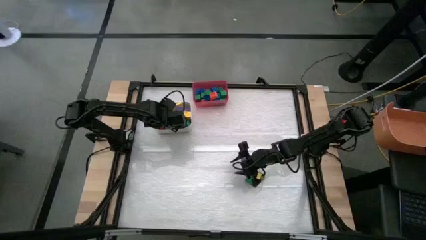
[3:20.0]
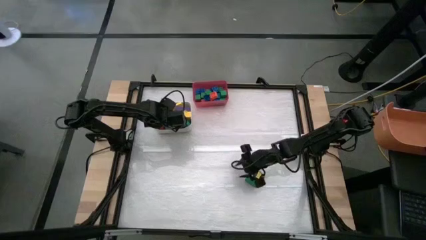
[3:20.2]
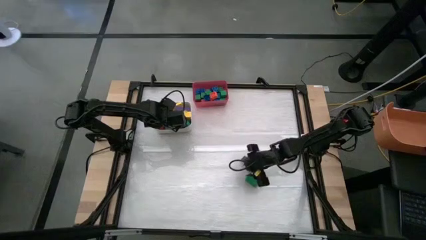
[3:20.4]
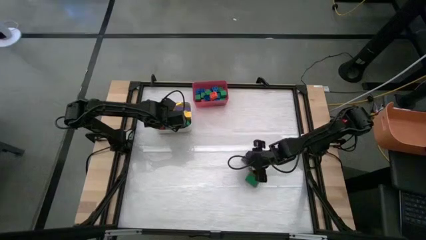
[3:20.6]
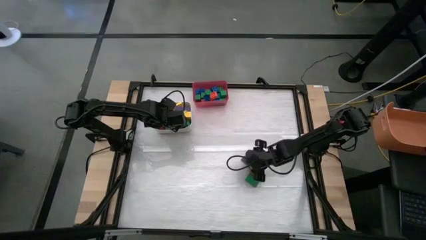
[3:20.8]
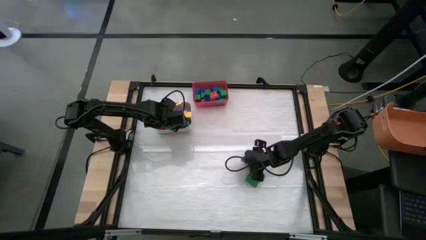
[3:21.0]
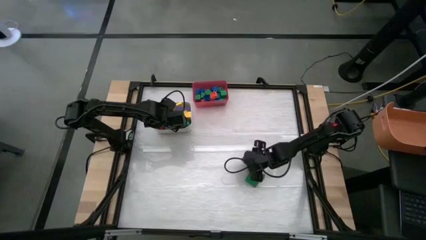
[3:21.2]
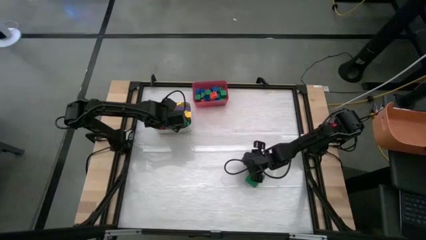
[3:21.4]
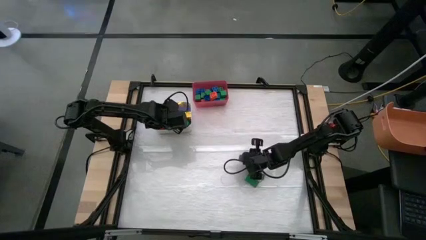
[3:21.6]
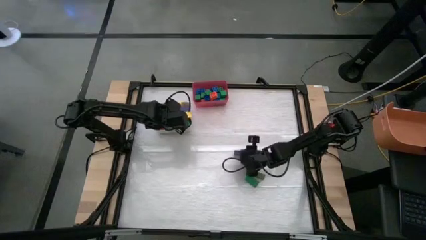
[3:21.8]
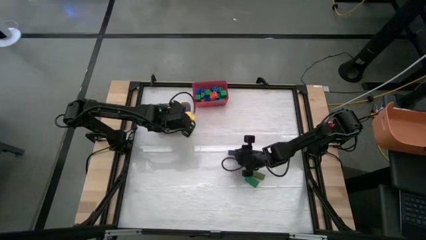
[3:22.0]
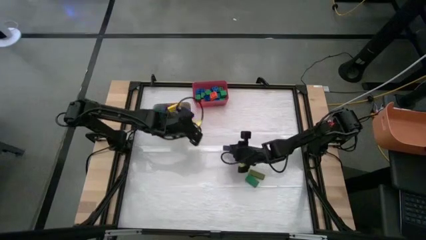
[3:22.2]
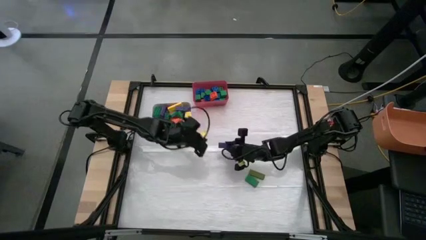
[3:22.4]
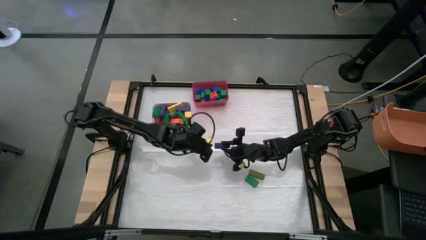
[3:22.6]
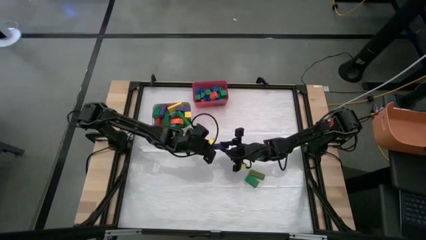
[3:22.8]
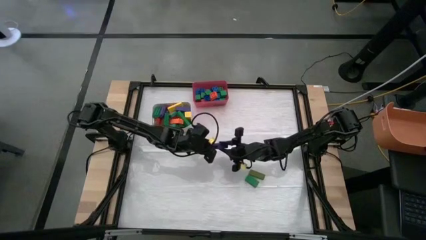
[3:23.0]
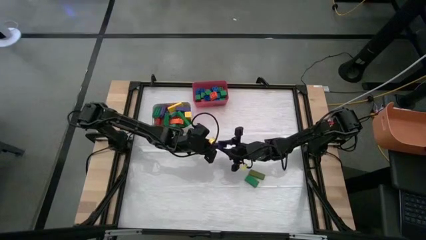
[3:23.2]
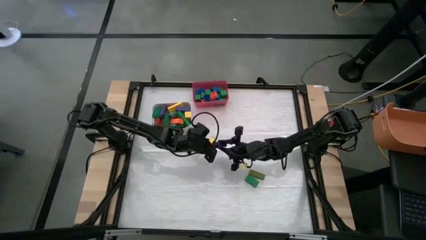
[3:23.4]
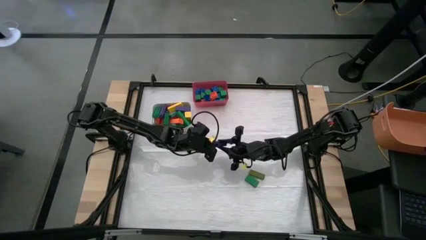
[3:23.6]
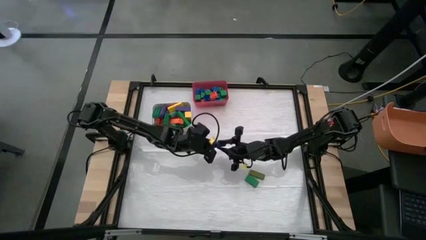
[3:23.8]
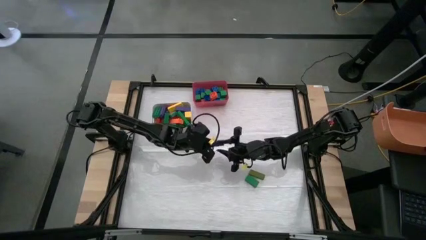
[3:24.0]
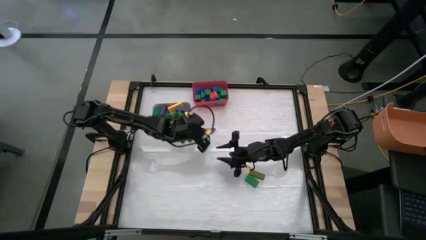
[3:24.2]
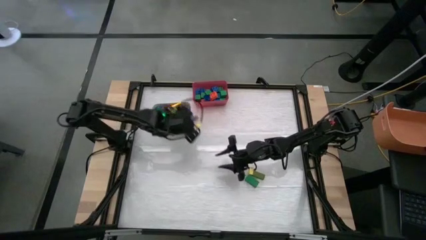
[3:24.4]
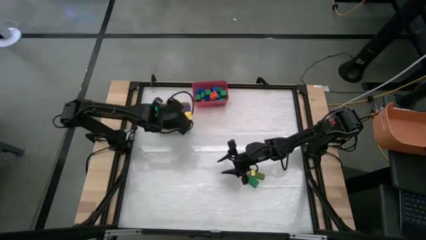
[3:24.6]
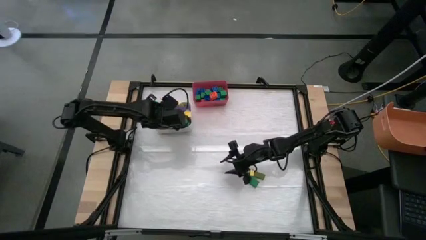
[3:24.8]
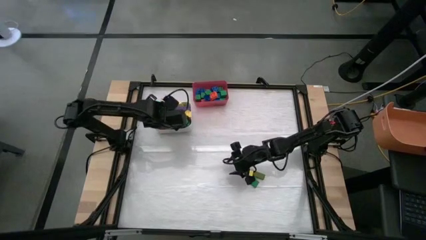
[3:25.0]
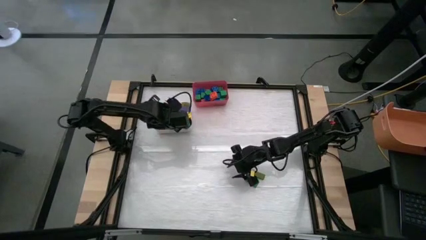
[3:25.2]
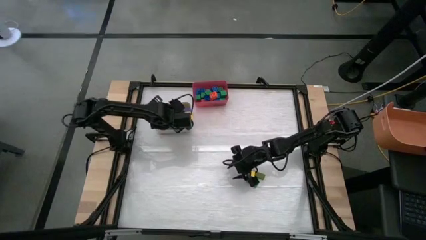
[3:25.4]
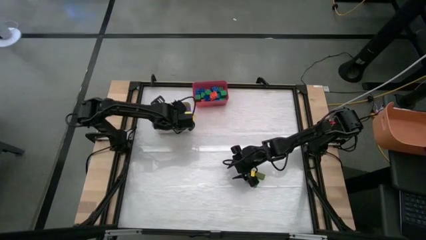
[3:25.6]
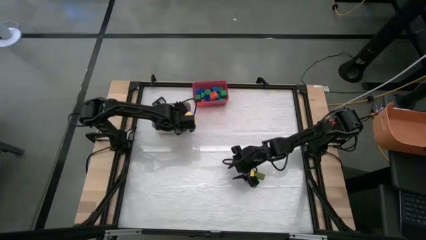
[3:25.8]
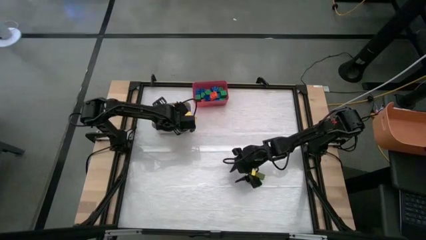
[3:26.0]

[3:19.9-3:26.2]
Task: Sort blocks by size
Put the large violet wooden block into the white bin

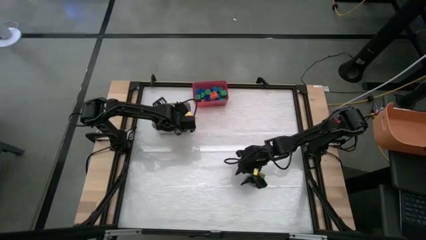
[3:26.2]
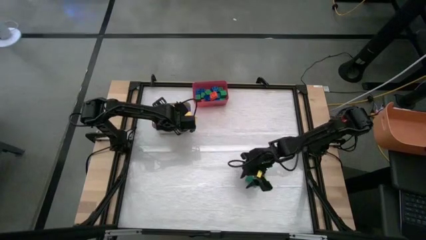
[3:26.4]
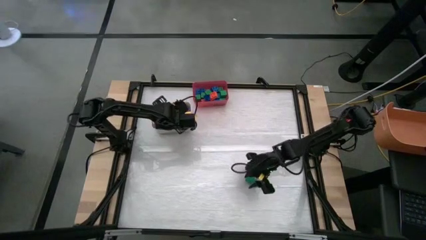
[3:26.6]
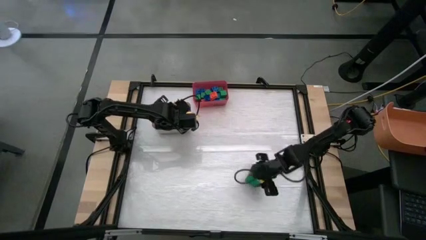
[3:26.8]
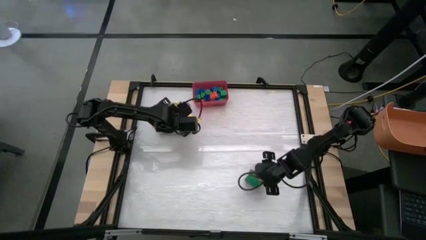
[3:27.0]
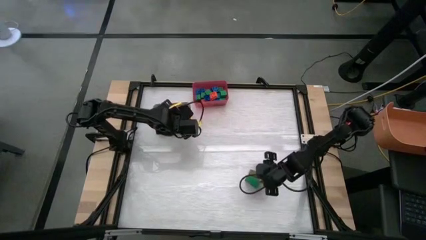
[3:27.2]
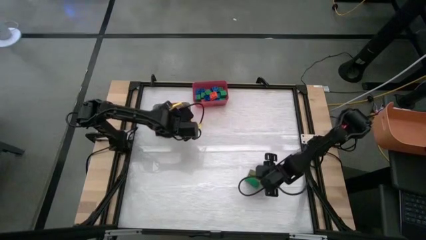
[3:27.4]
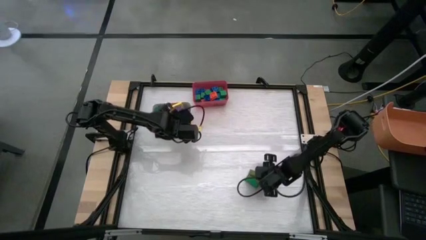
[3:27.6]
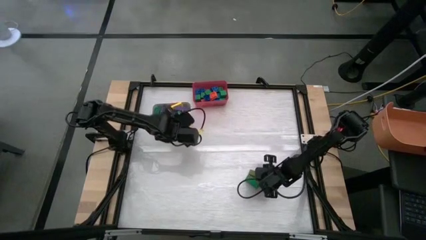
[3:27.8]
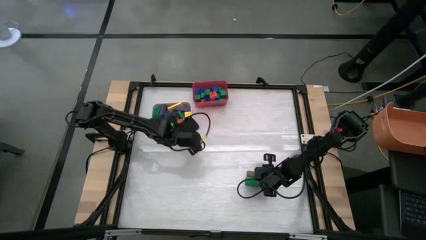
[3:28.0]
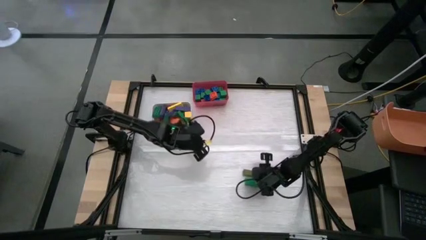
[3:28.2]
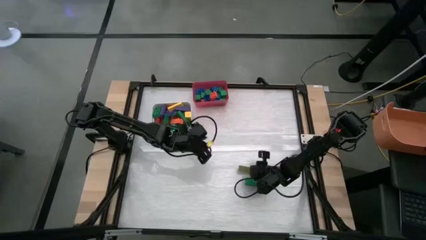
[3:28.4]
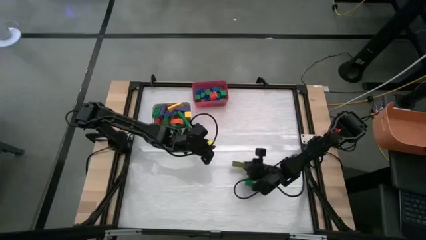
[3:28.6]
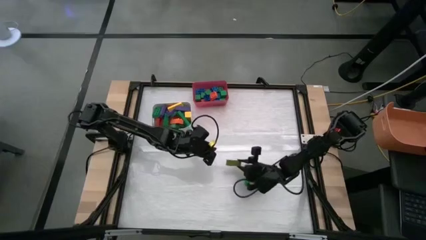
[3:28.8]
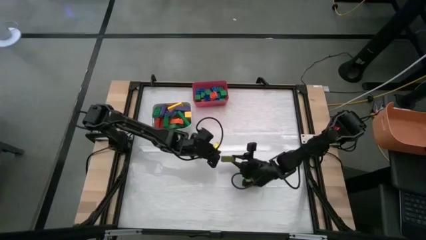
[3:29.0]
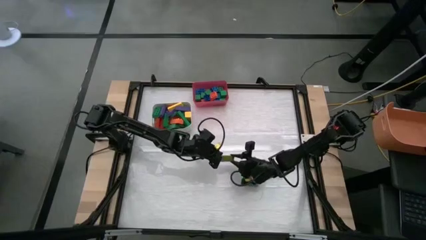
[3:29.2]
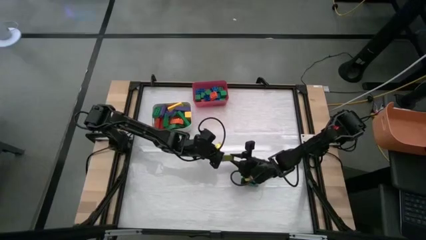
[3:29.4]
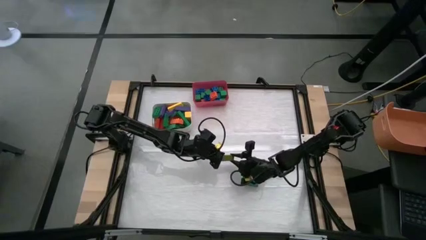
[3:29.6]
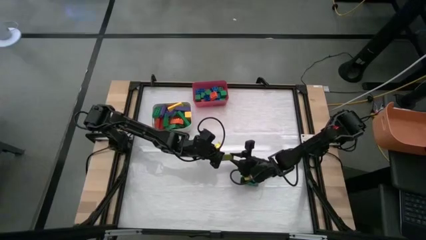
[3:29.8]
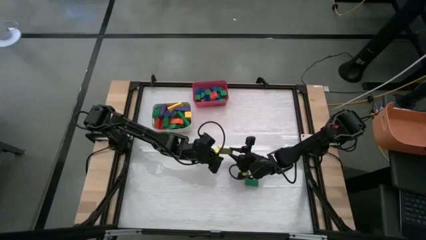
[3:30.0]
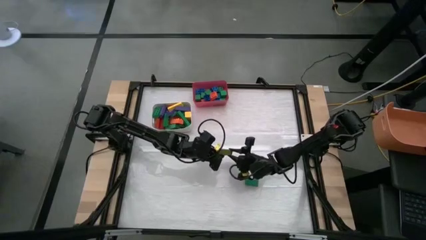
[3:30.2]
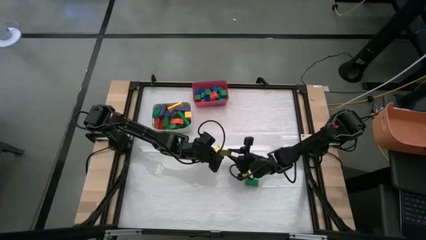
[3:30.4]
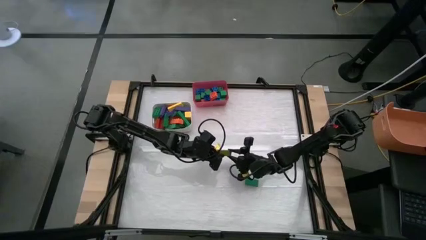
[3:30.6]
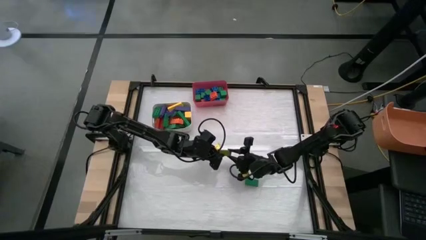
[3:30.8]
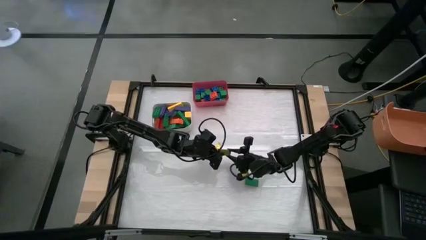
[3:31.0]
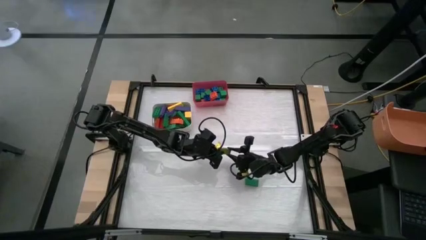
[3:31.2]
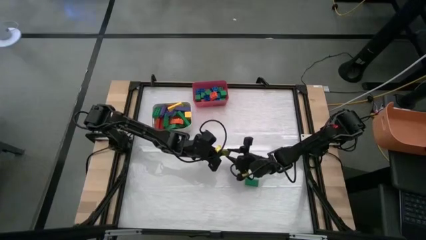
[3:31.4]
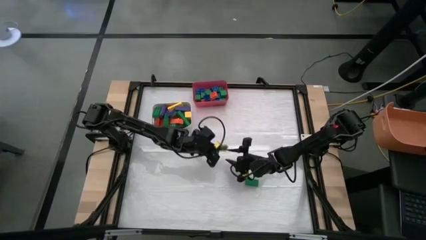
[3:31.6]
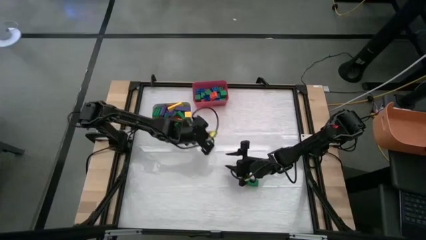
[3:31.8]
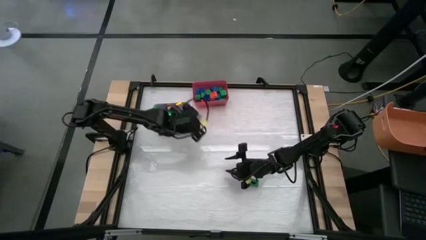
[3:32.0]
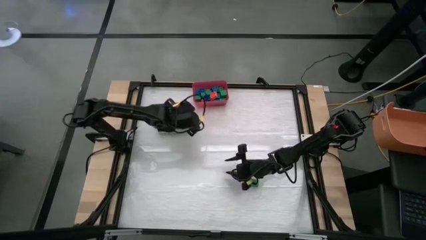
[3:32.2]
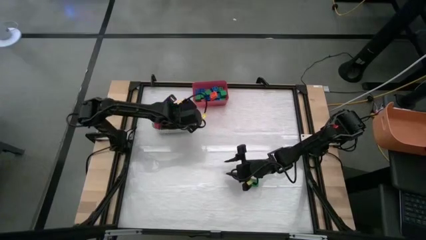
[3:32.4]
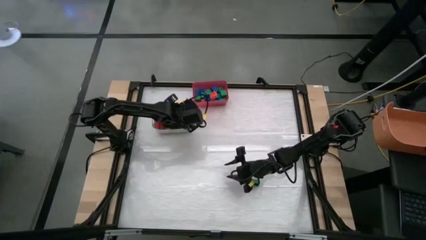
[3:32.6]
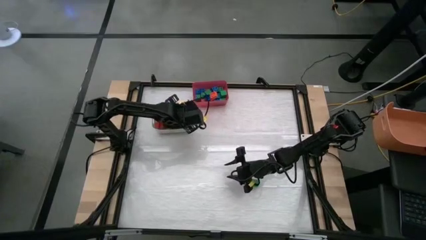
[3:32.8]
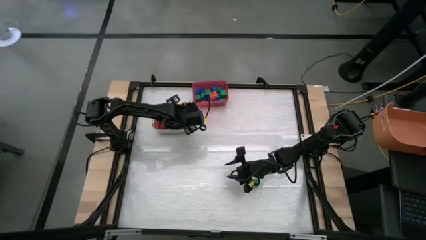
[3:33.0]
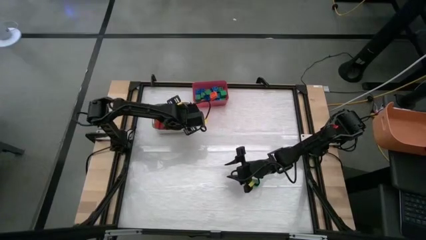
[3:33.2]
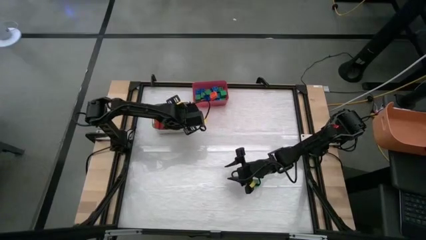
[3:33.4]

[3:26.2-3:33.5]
Put the large green wooden block into the white bin
